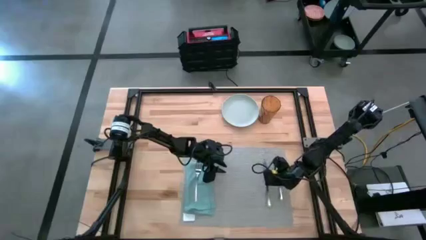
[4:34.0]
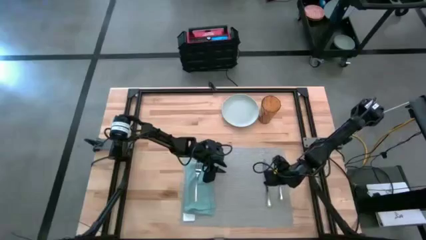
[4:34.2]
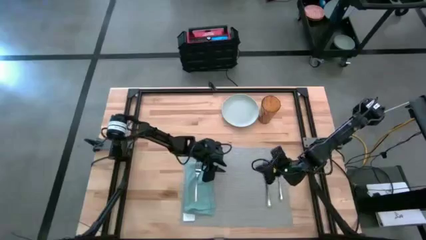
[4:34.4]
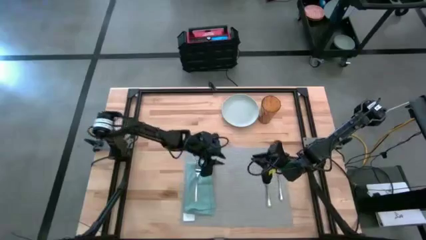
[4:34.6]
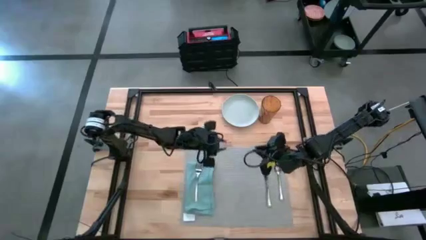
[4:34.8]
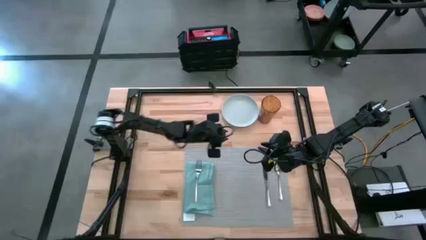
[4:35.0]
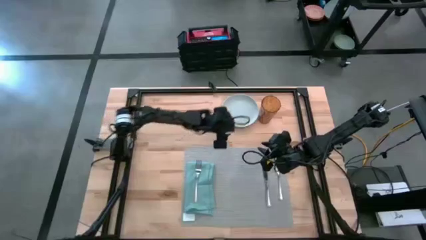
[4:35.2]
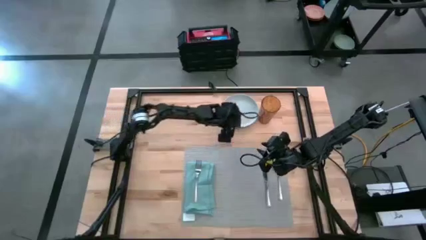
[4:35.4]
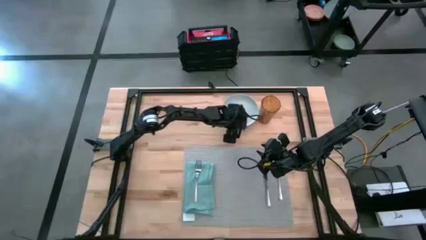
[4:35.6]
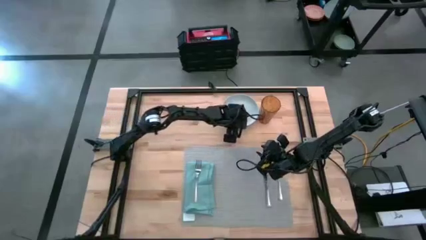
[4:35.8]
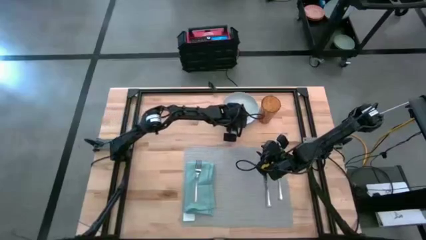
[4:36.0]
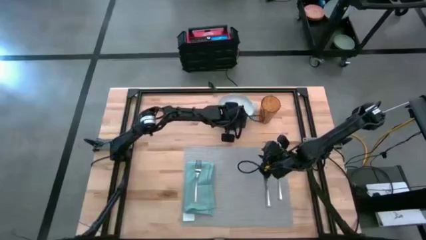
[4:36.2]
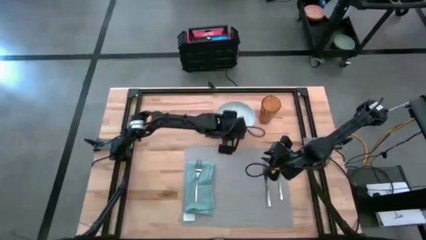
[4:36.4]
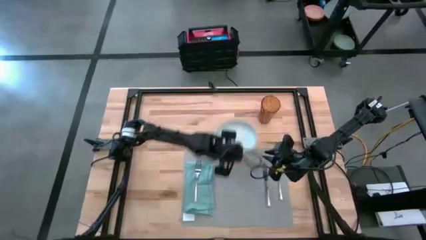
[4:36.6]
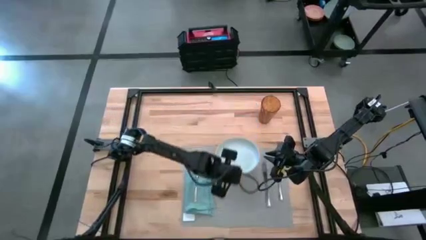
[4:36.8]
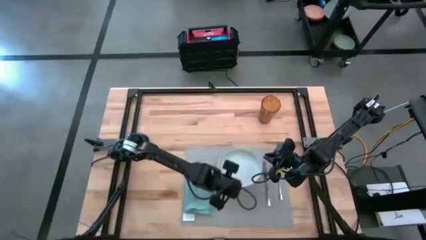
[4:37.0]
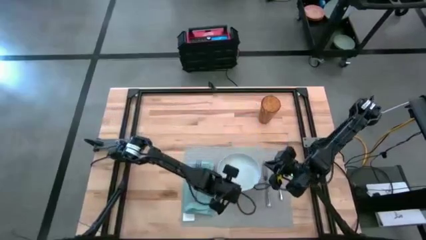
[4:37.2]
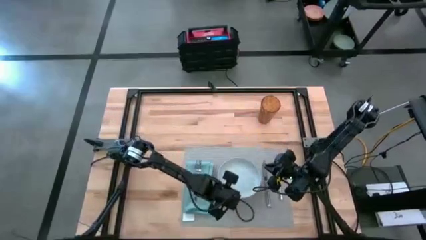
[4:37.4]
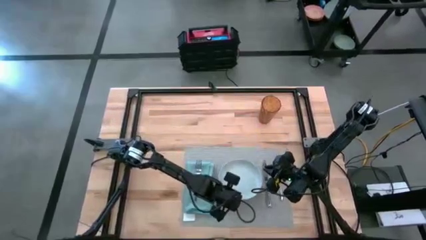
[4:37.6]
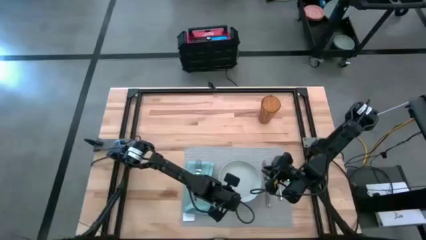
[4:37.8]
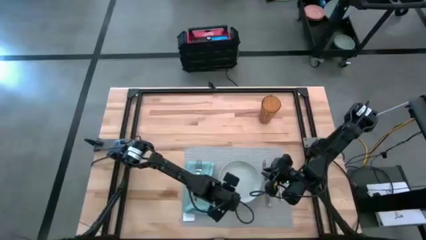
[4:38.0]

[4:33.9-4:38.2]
Task: Set table place
Put the light gray plate on the gray placemat

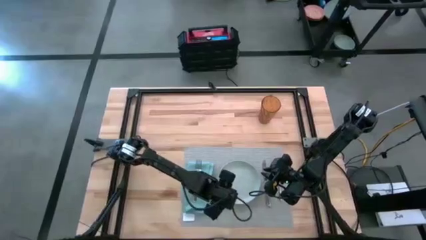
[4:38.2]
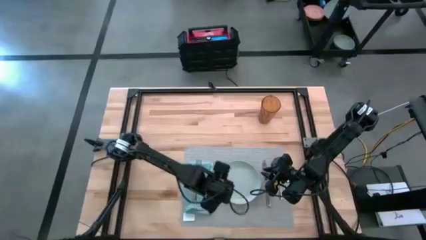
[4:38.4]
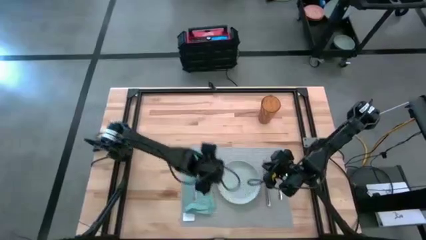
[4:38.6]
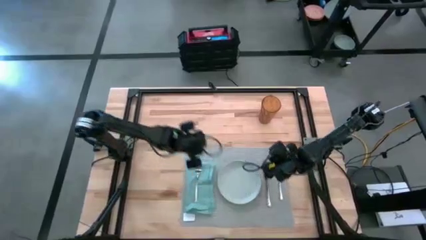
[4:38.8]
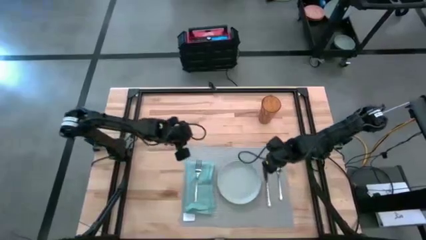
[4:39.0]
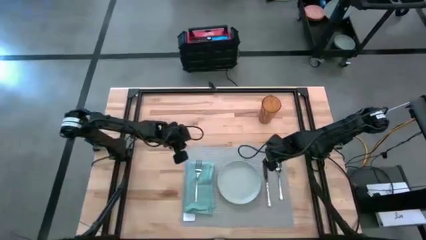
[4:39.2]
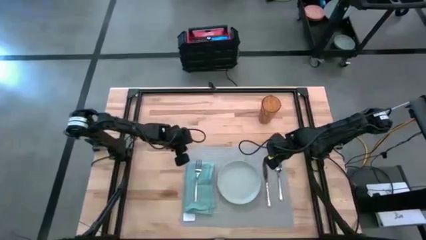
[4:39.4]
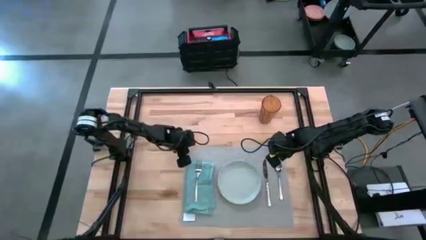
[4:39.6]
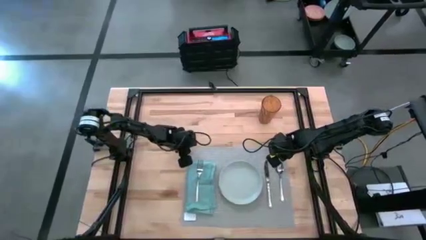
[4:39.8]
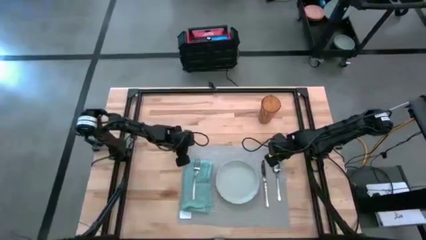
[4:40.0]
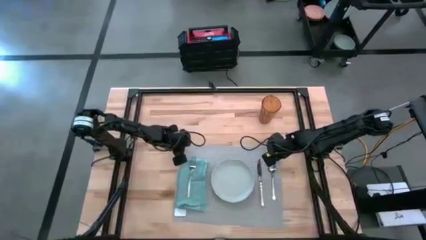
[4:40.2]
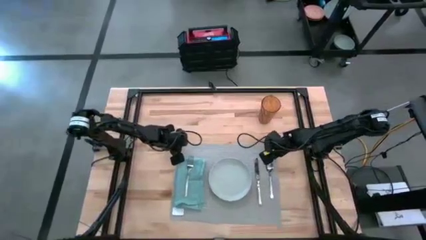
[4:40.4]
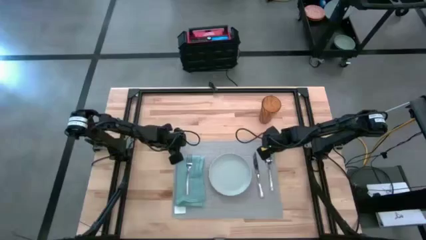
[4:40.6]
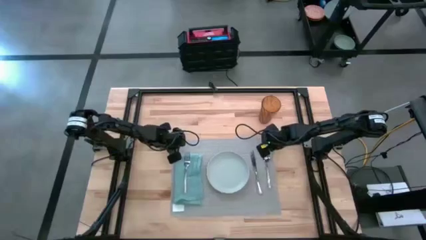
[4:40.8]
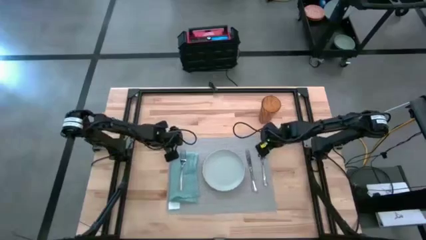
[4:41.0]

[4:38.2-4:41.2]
Adjust the gray placemat

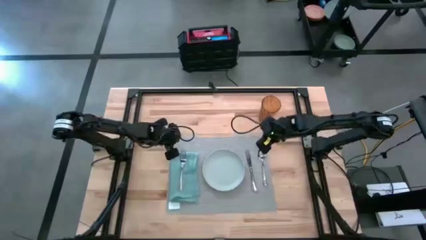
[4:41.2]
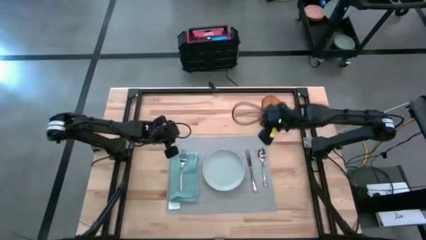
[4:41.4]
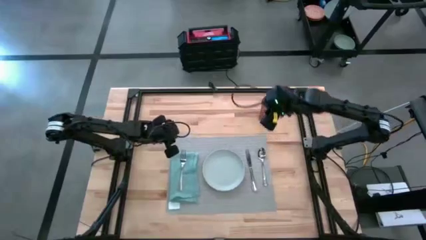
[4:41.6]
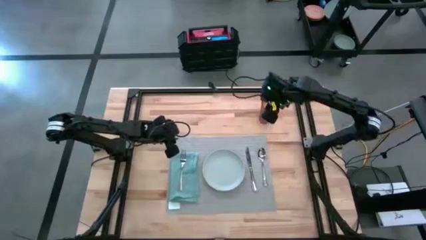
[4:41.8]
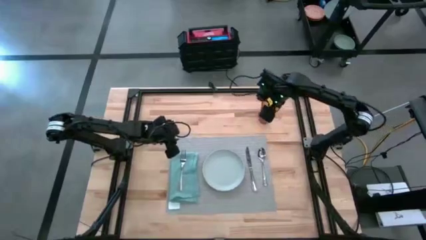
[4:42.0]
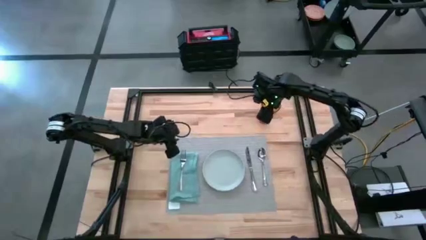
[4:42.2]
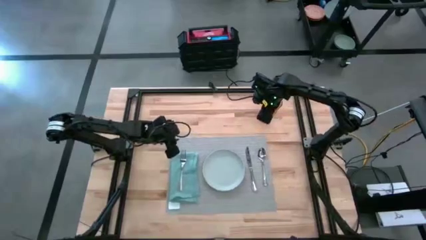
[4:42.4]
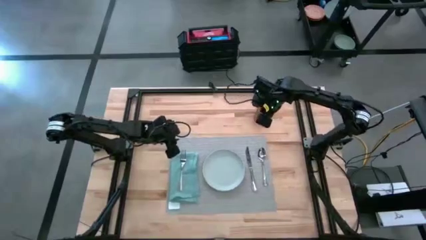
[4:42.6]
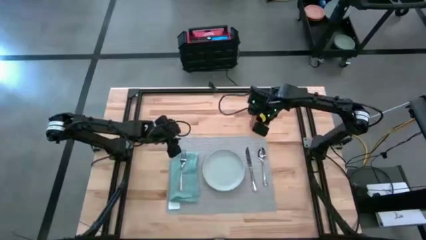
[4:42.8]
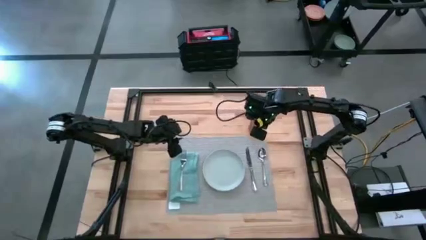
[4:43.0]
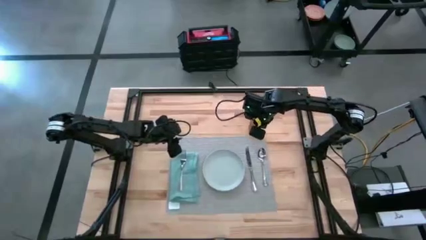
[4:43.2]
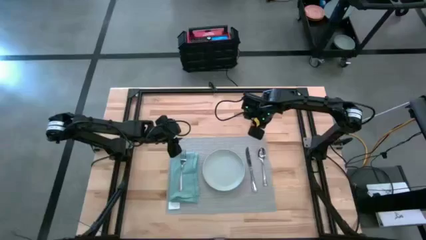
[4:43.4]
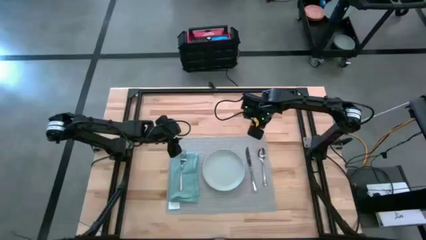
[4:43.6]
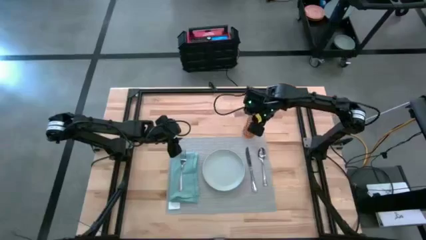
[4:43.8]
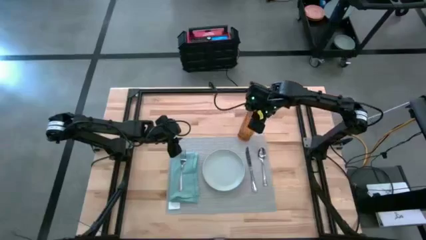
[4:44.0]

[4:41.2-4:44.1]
Put the brown glass at the top right of the gray placemat

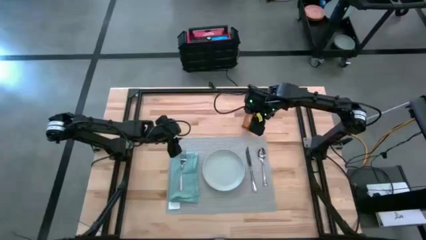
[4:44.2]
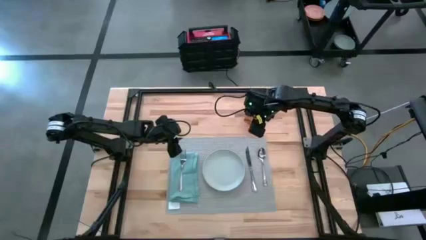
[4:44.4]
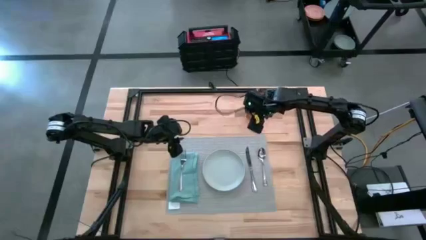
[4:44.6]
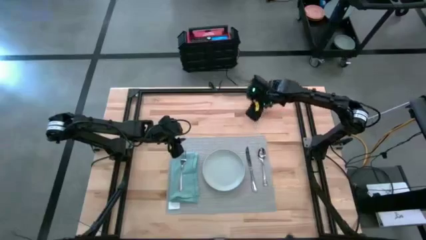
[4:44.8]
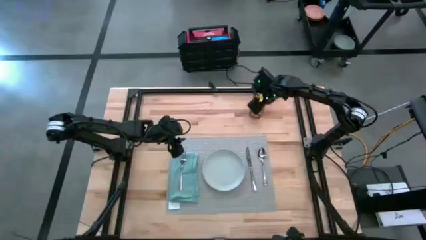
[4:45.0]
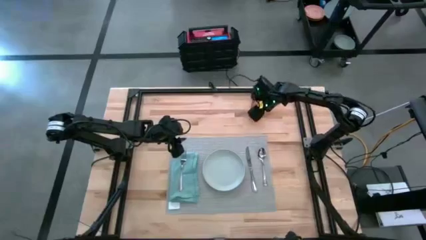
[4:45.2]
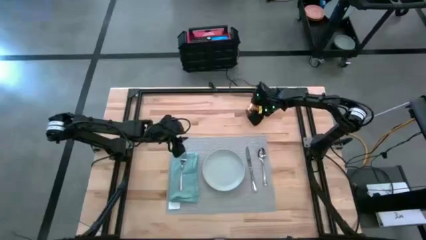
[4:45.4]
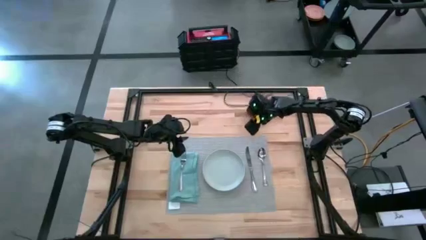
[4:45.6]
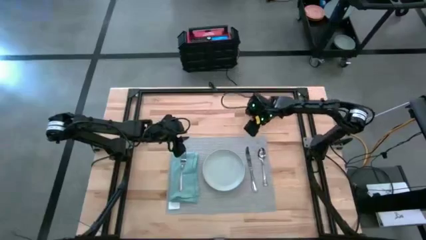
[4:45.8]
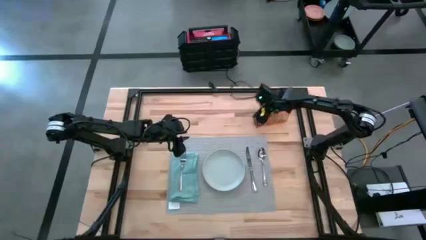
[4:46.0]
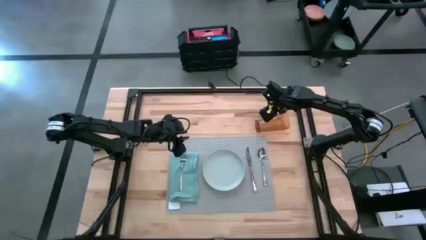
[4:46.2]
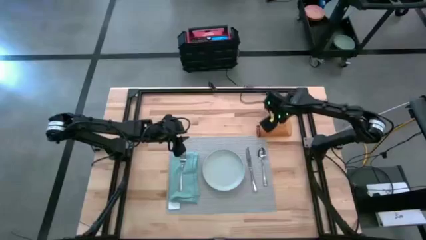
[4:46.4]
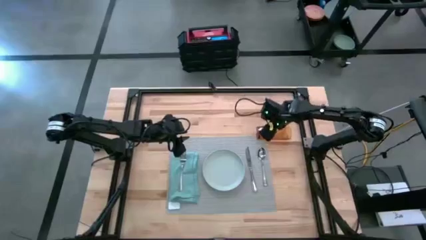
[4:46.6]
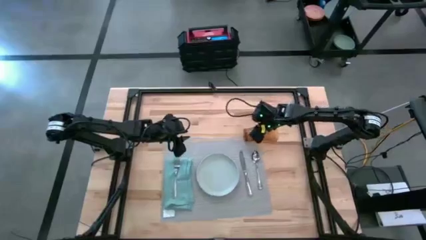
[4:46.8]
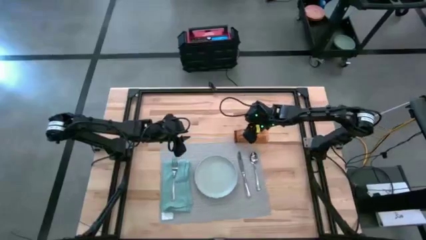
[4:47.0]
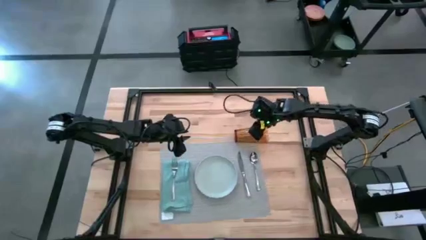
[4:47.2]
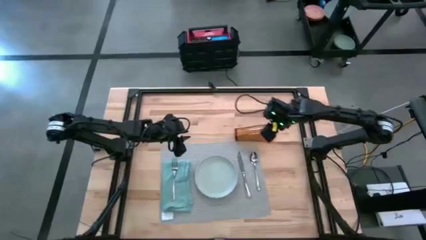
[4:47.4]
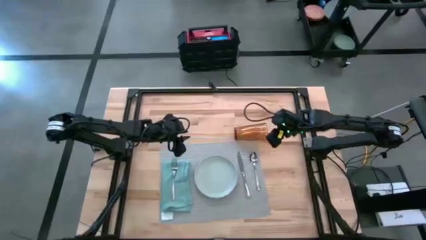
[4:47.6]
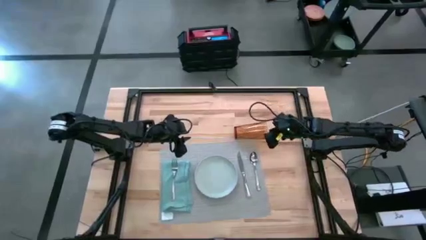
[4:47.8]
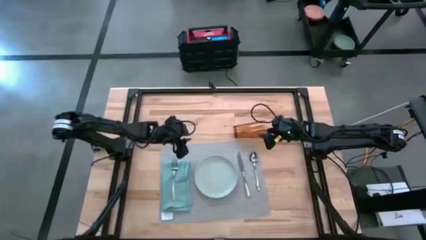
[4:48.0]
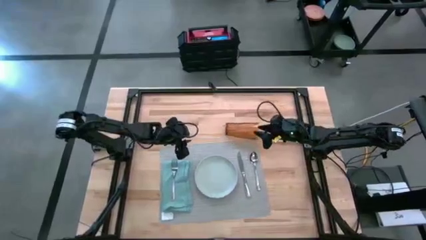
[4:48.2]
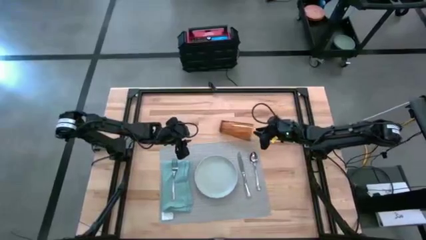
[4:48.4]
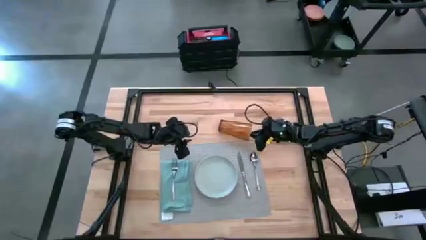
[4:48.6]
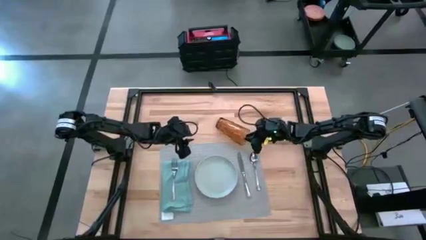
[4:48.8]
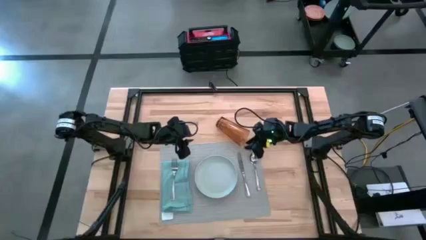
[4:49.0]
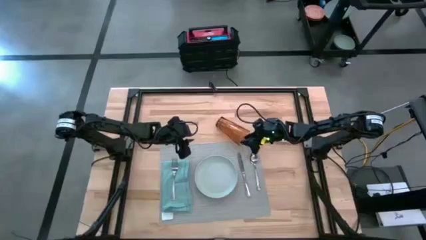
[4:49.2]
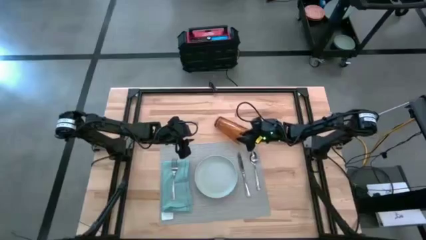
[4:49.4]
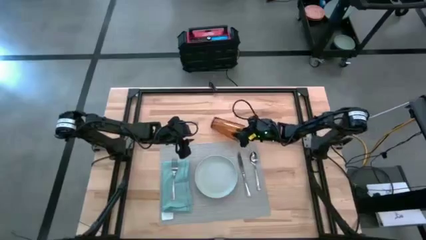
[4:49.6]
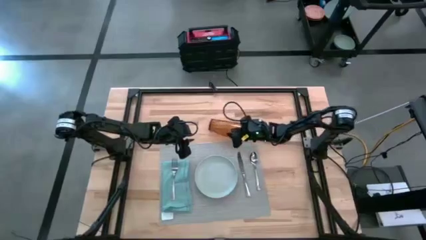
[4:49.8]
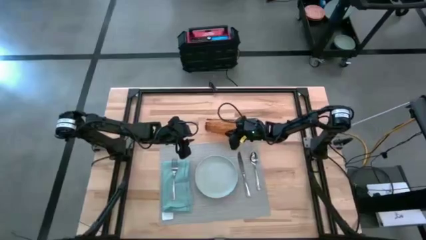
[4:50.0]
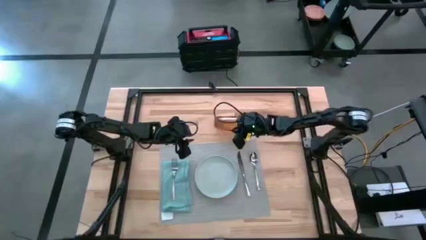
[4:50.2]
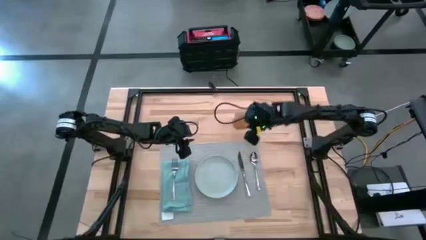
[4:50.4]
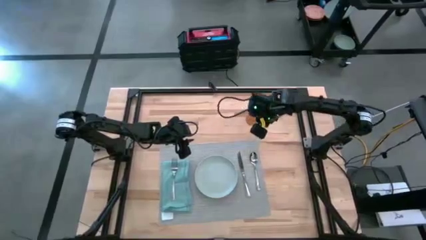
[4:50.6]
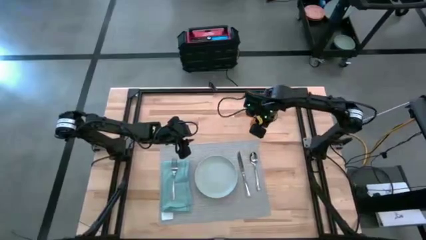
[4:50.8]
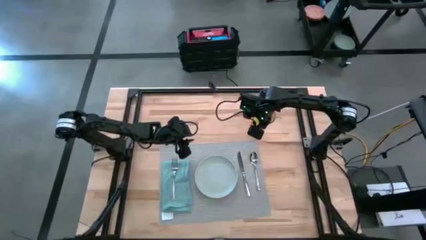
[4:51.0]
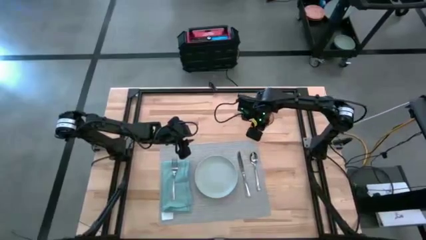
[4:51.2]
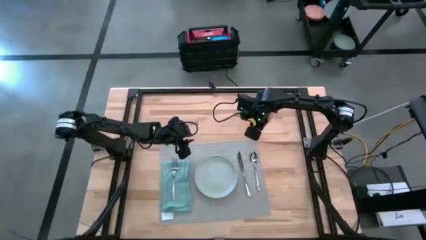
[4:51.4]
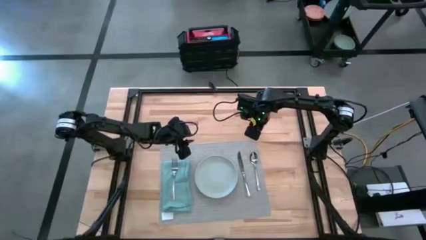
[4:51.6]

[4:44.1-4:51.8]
Put the brown glass on top of the gray placemat
